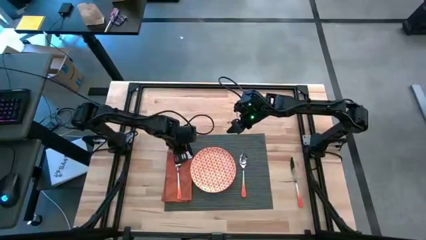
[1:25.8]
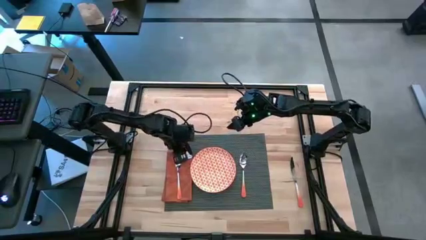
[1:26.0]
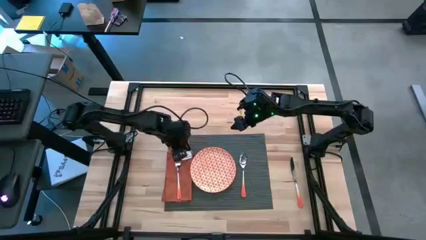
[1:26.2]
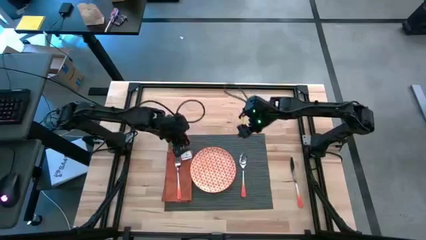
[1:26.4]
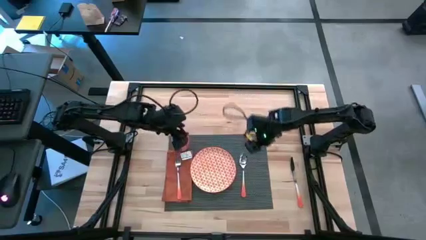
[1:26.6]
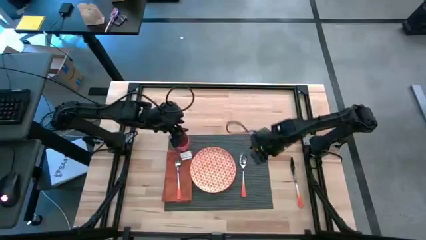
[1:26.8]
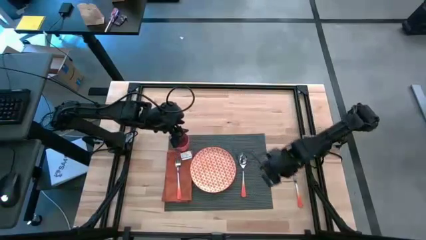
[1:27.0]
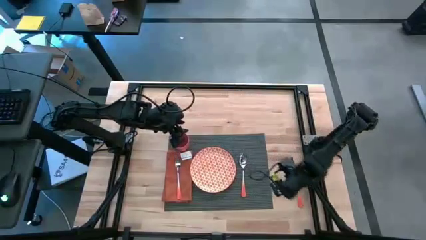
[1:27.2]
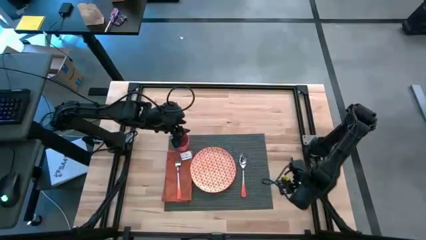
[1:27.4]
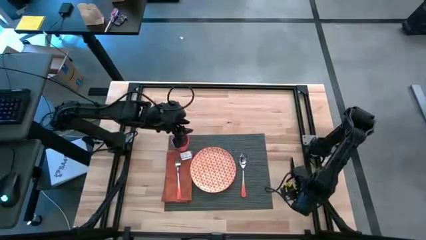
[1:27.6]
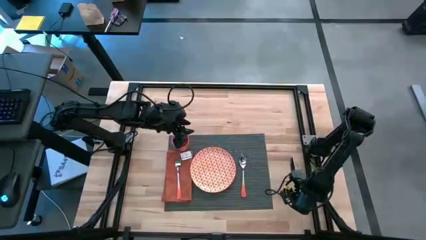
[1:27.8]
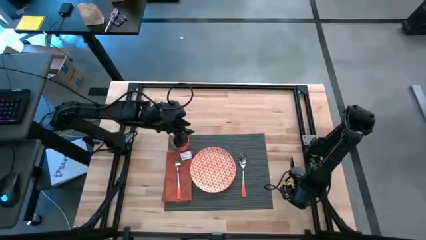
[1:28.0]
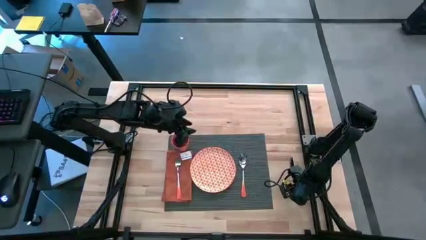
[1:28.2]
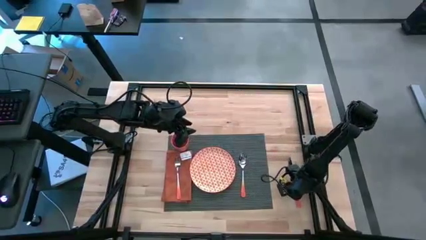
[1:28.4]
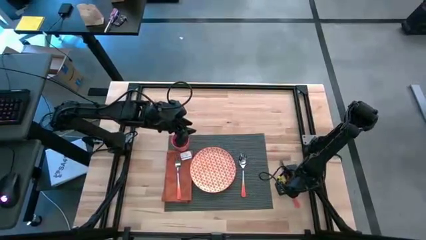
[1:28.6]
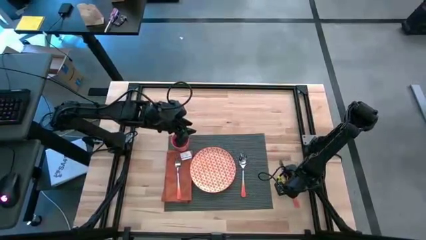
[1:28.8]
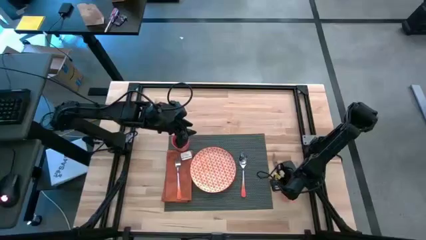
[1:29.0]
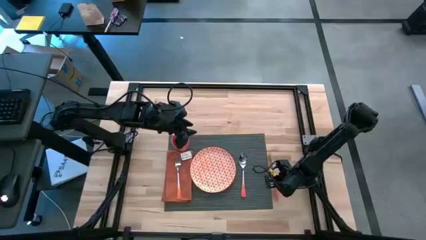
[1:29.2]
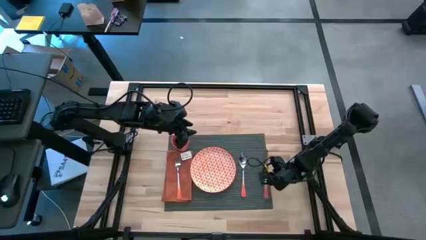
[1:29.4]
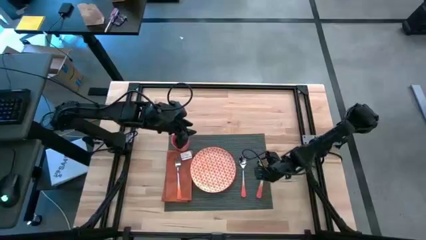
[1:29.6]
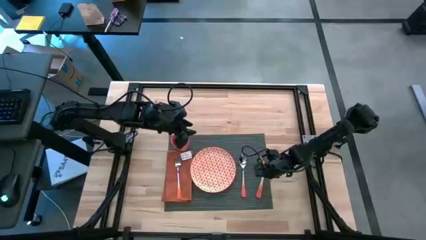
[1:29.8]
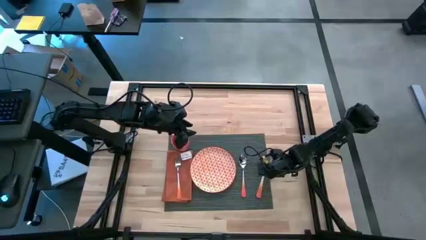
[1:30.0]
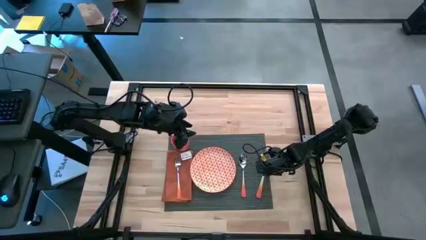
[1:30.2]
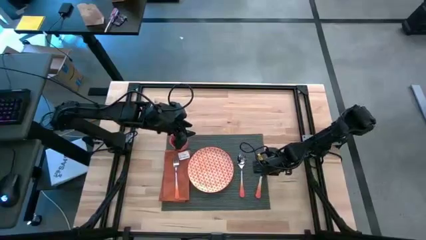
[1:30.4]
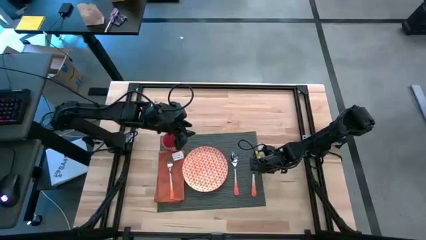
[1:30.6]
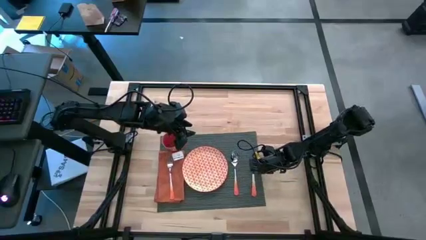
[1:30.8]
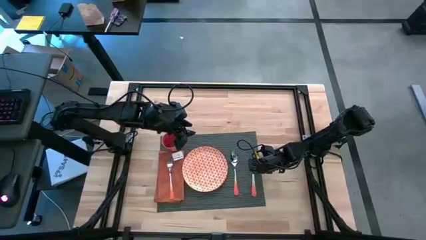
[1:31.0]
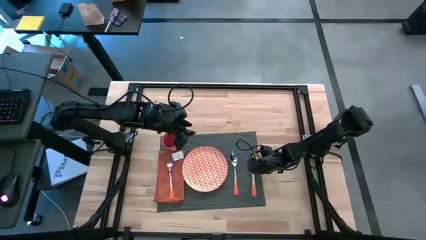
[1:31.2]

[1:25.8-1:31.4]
Task: Set table place
Put the orange table knife on the table gray placemat to the right of the orange spoon

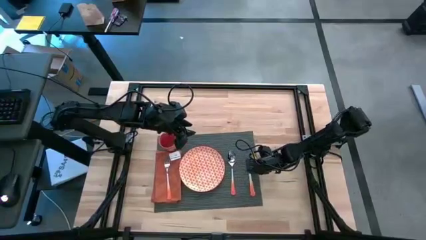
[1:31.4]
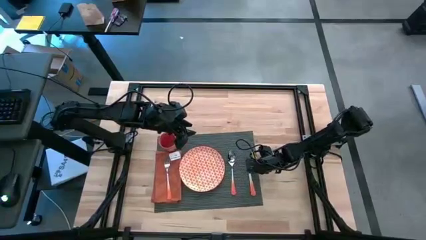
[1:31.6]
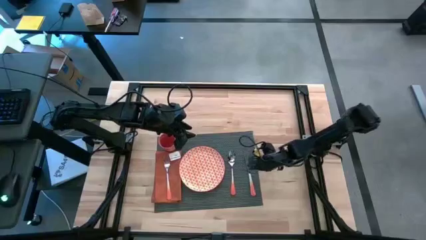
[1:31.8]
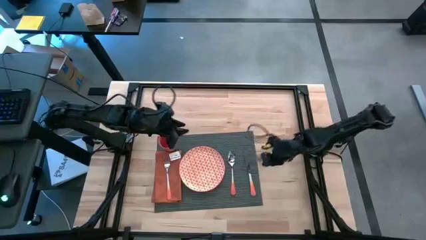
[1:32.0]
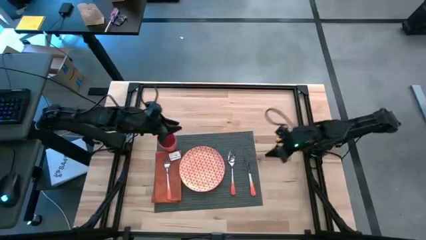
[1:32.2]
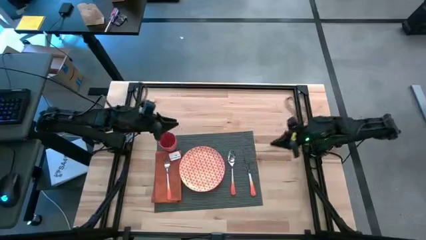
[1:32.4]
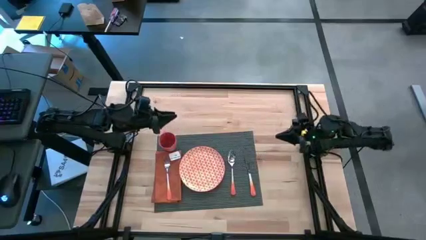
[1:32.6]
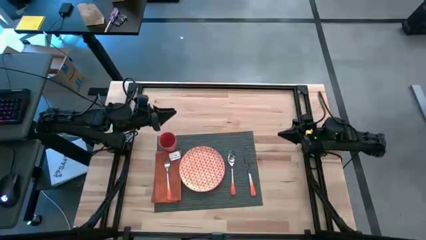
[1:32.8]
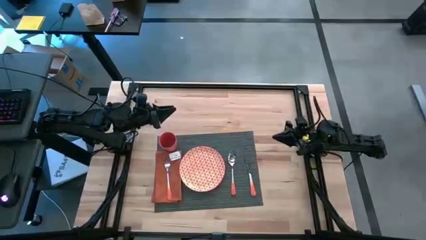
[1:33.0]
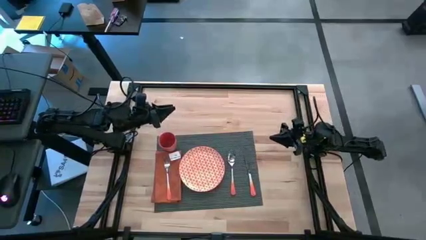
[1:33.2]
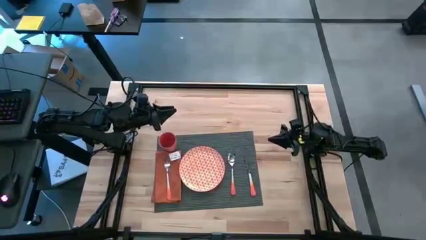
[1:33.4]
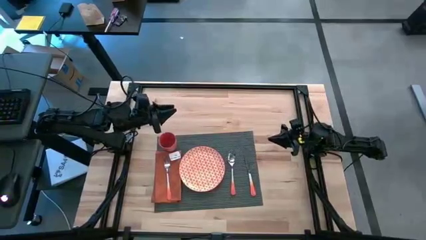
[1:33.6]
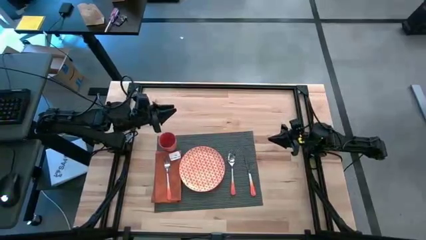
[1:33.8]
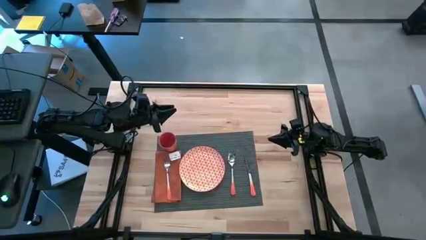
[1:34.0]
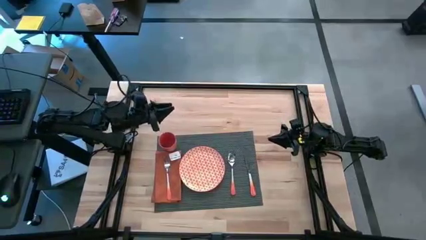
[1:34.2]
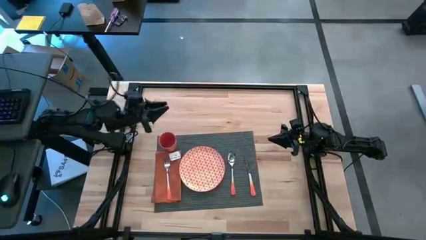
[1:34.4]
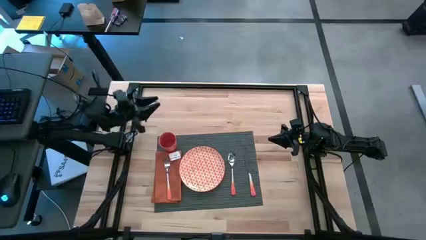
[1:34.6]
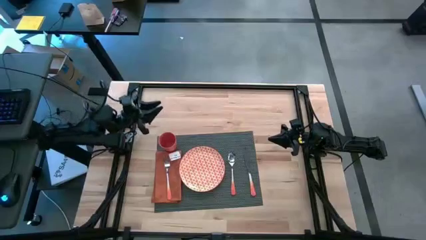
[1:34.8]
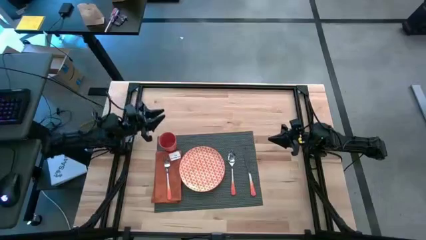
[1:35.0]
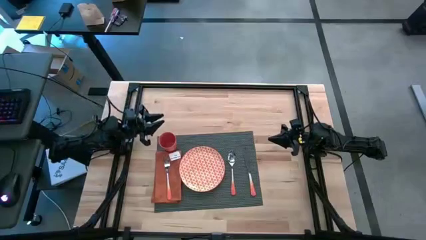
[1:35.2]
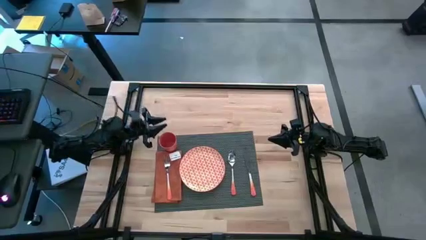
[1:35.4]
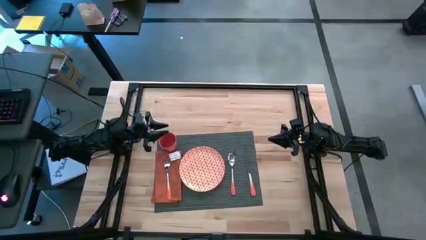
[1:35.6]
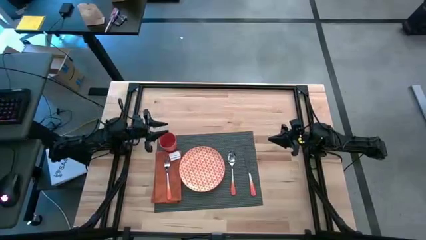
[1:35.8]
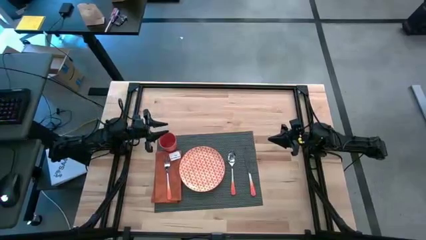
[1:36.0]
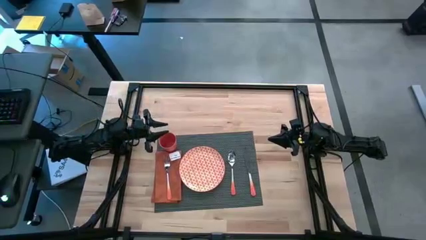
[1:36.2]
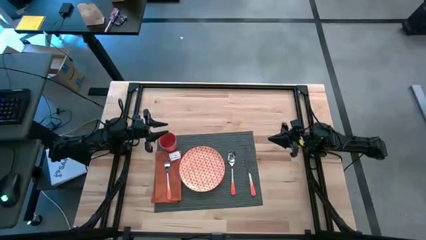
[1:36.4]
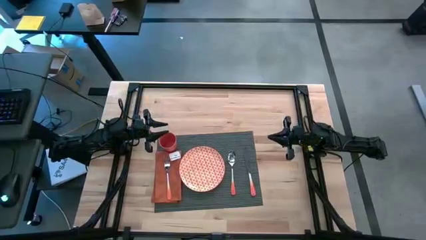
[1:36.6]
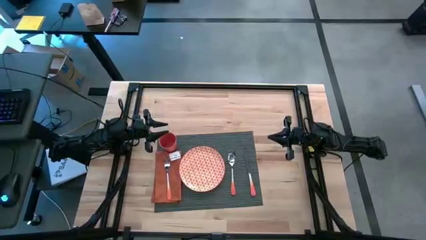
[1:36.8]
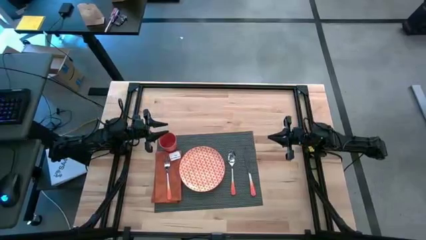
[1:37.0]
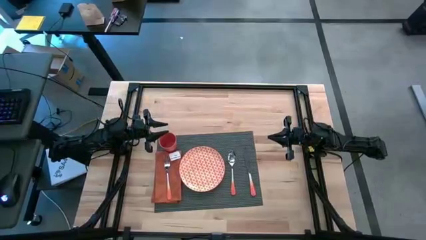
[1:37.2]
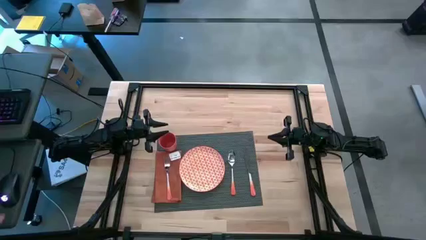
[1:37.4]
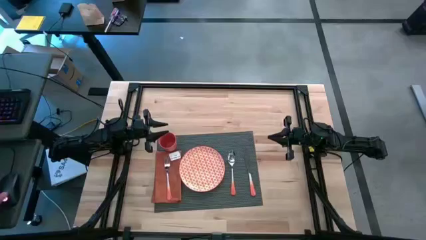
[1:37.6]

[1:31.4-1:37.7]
Return to Home Position

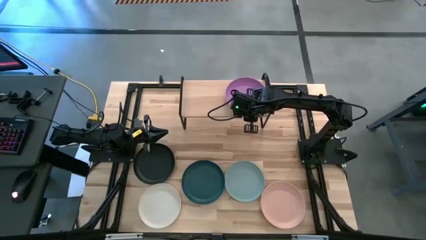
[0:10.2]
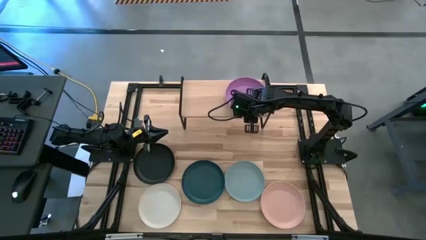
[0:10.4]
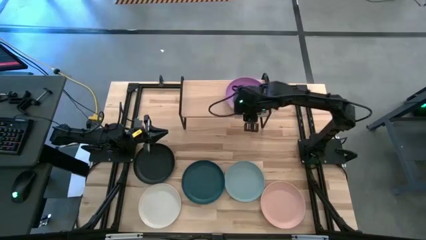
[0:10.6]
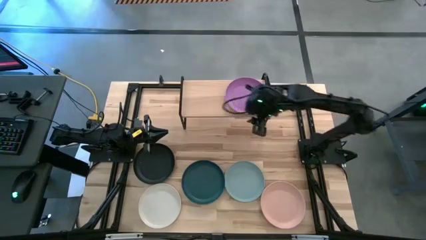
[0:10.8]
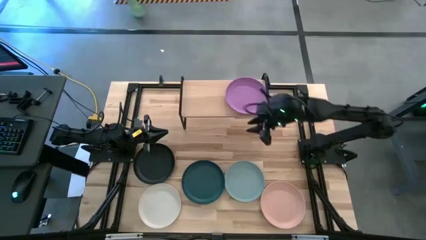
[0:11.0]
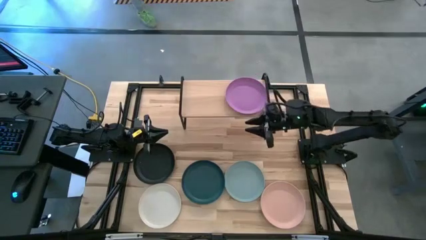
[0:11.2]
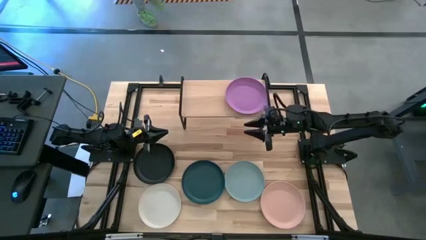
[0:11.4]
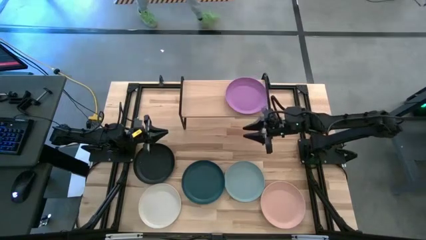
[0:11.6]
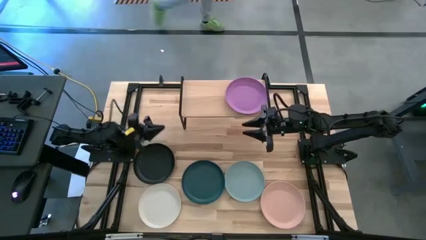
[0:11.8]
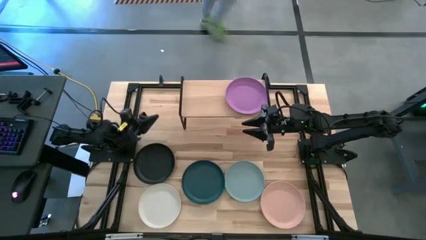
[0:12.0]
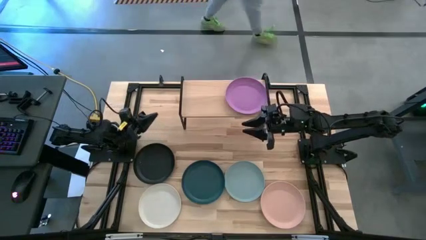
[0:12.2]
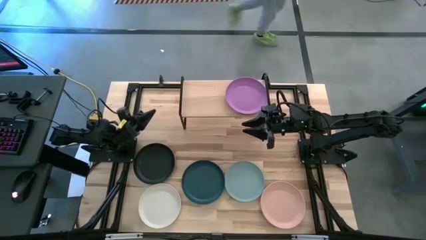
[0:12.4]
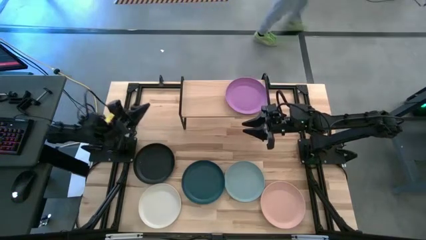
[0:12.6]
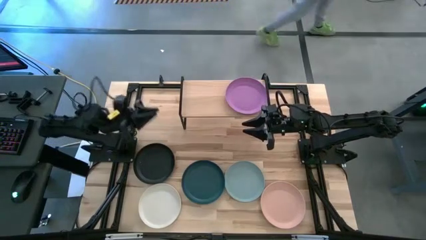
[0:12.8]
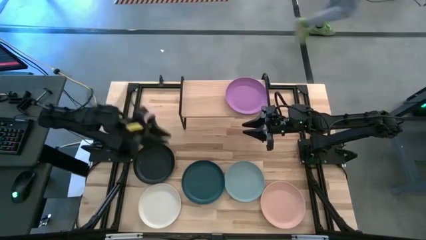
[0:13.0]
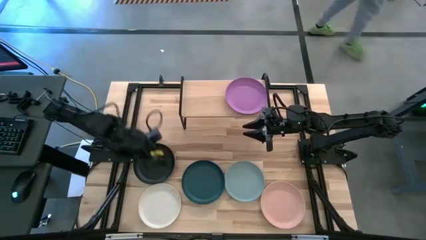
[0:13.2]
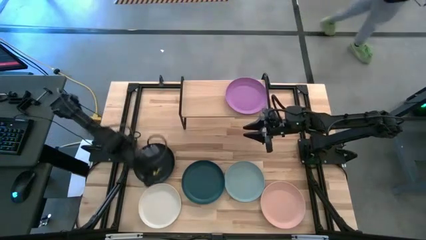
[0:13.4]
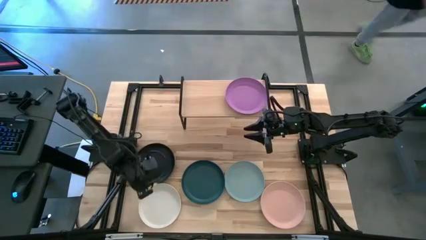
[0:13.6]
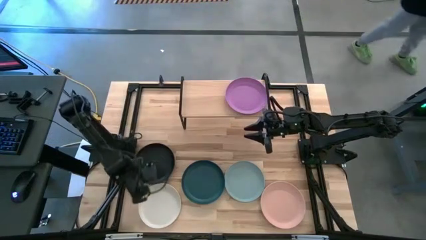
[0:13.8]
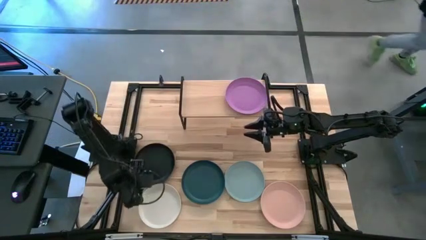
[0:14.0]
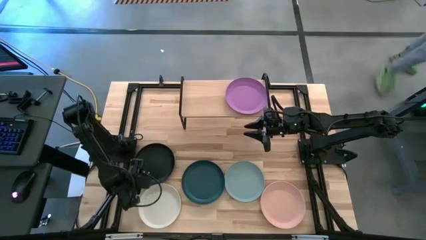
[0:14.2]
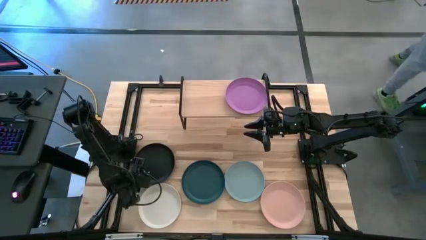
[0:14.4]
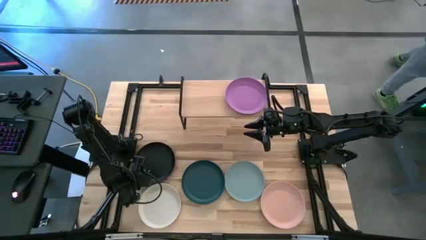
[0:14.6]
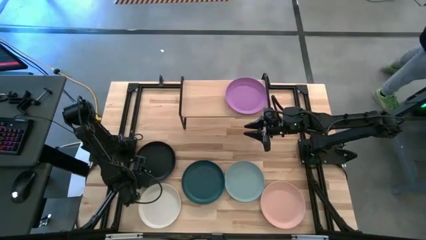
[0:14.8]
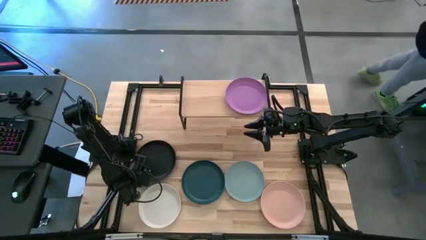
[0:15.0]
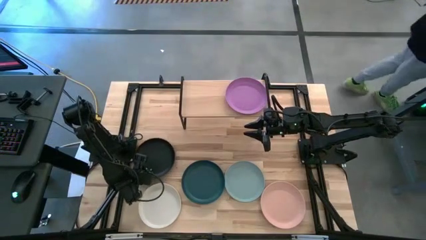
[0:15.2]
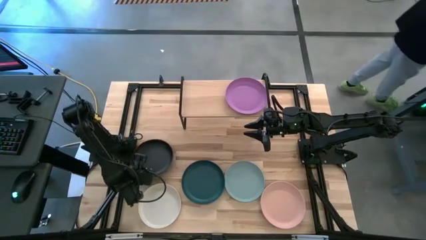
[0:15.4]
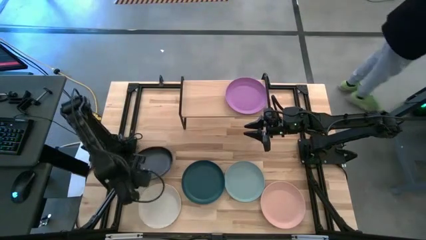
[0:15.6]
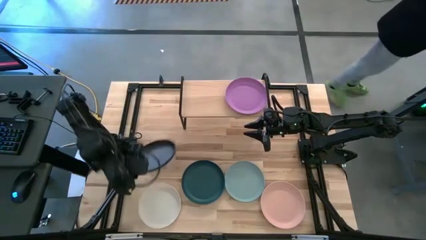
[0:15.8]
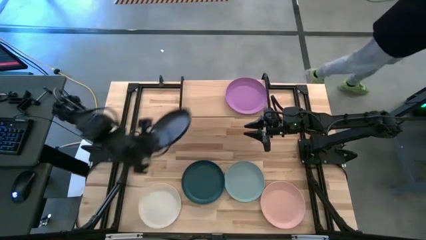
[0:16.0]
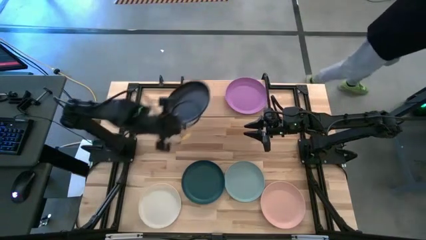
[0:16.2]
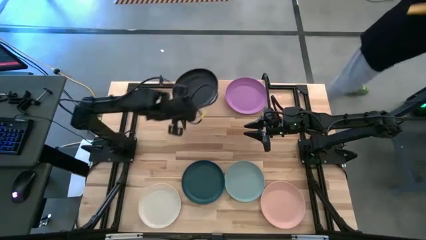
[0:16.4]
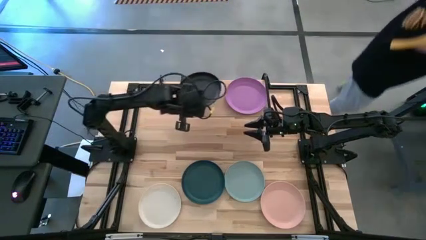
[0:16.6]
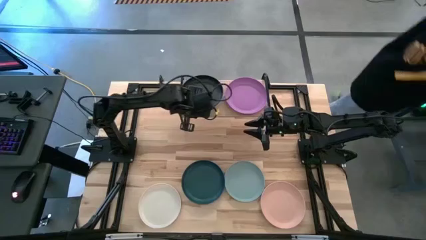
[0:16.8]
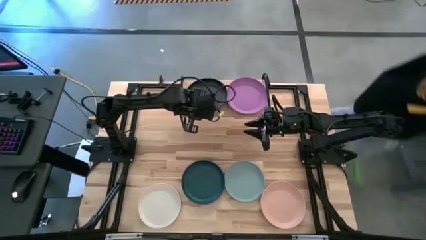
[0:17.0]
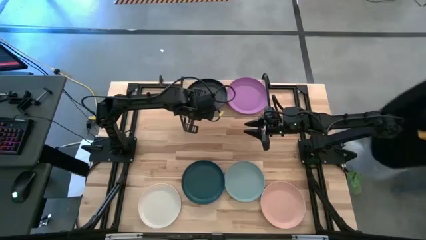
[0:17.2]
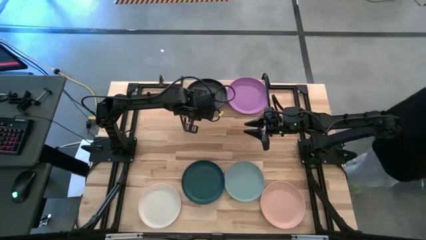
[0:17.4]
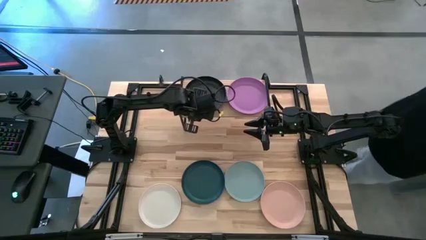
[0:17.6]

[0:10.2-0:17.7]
Task: Place and stack plates onto a shelf
Put the black plate on the shelf
